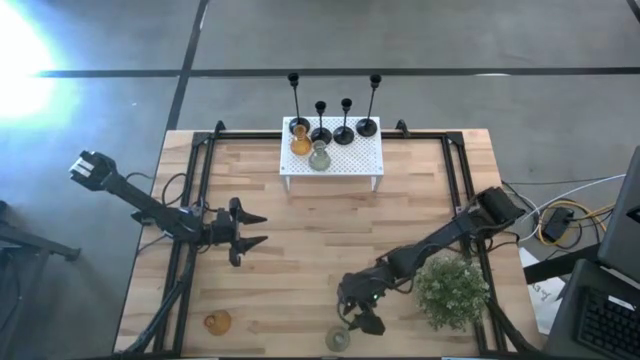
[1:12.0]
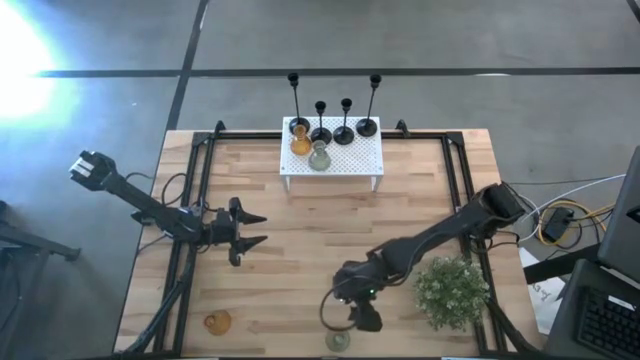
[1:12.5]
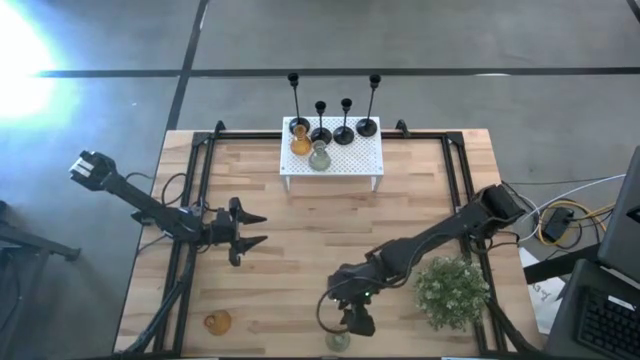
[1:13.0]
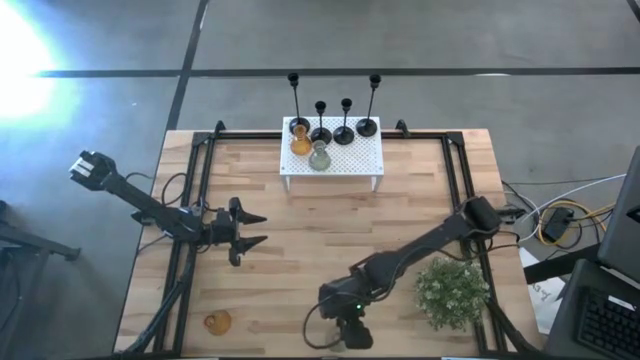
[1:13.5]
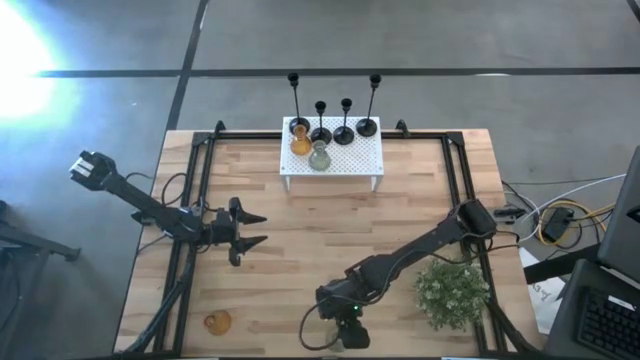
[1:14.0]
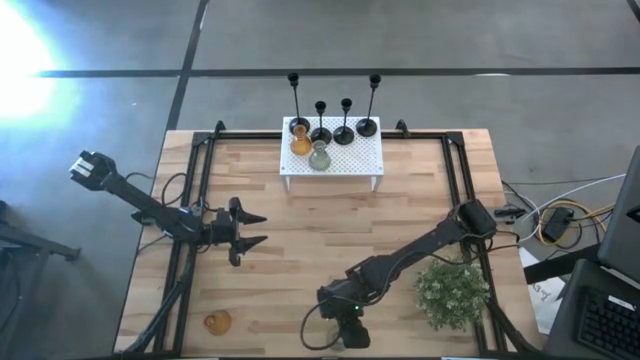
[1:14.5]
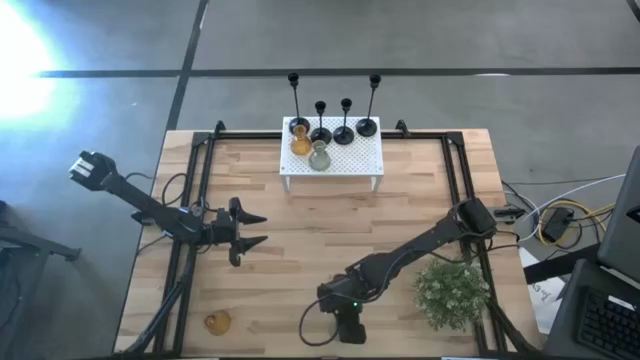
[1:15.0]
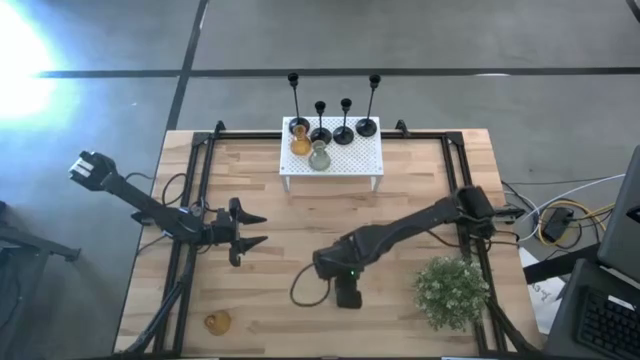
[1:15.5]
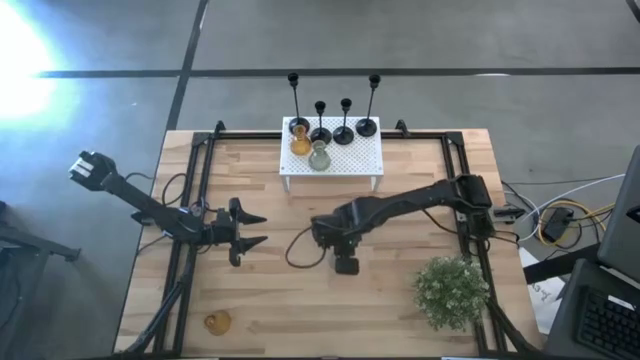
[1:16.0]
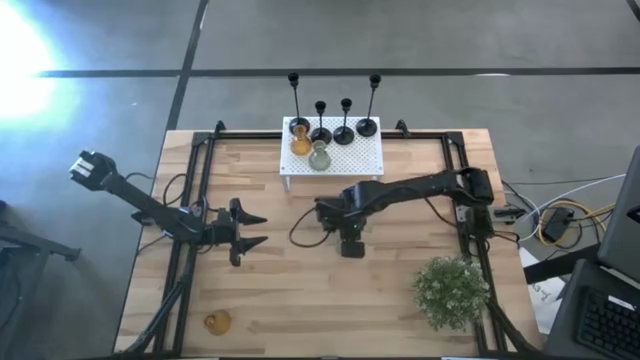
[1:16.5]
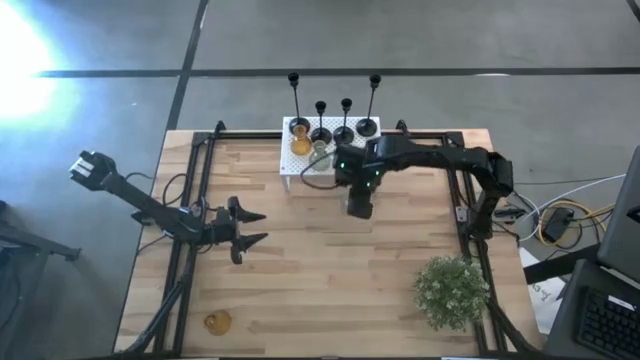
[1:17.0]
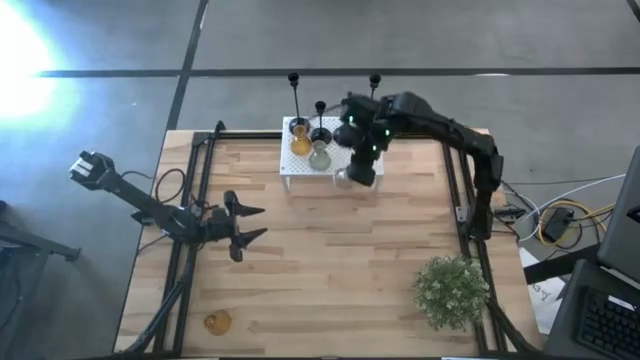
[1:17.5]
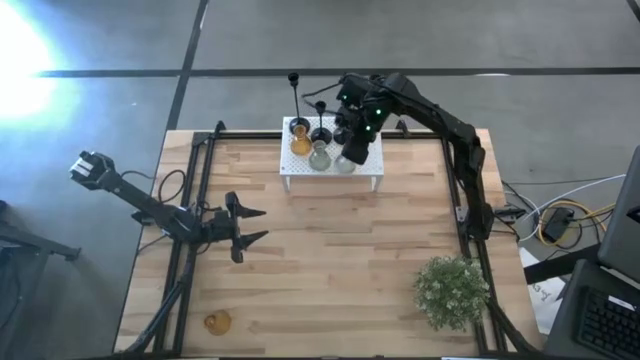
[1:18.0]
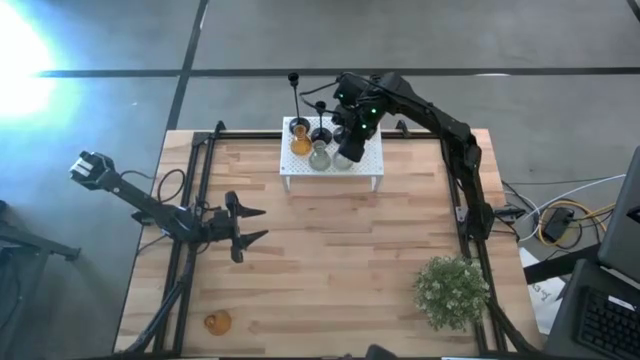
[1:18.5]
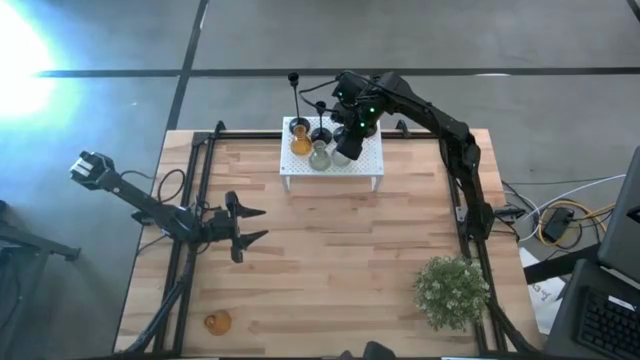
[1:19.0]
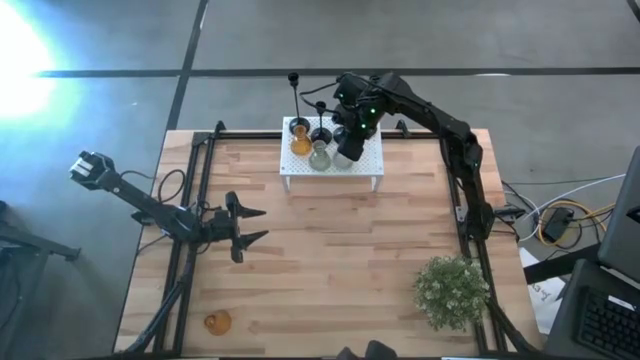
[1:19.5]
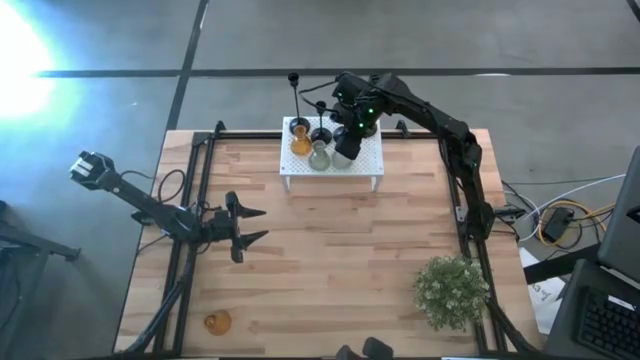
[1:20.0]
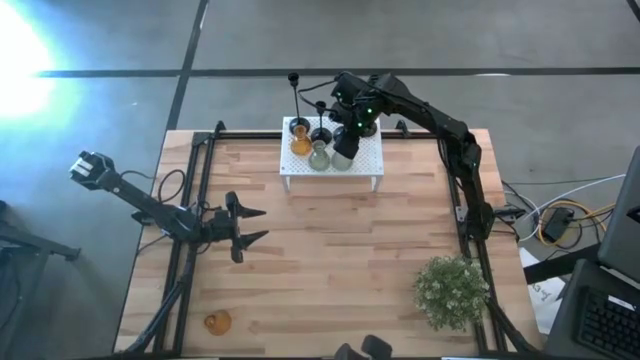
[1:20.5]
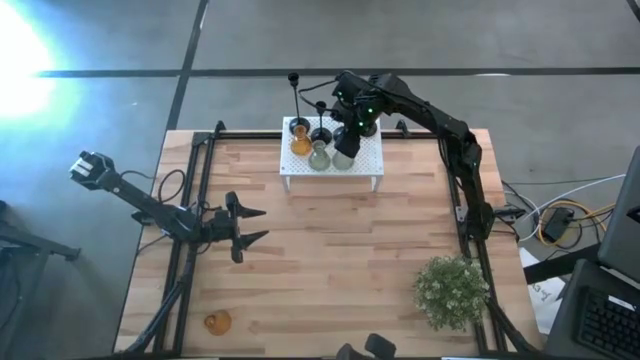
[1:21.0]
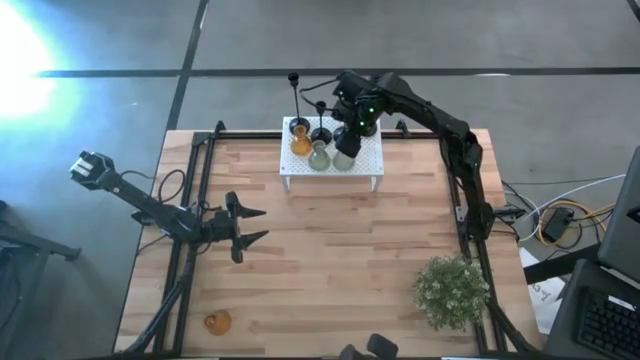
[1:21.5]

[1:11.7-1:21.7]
Task: Pick & Place candle stick holders
Put the green glass candle holder on the shelf

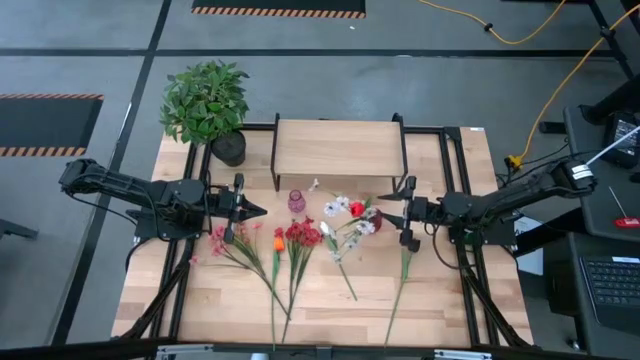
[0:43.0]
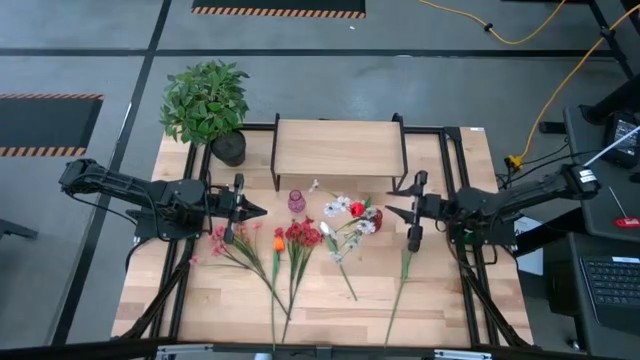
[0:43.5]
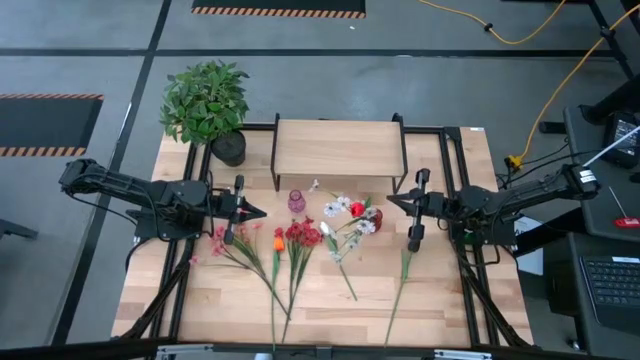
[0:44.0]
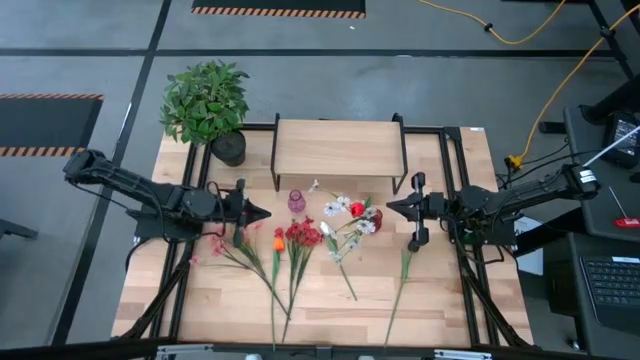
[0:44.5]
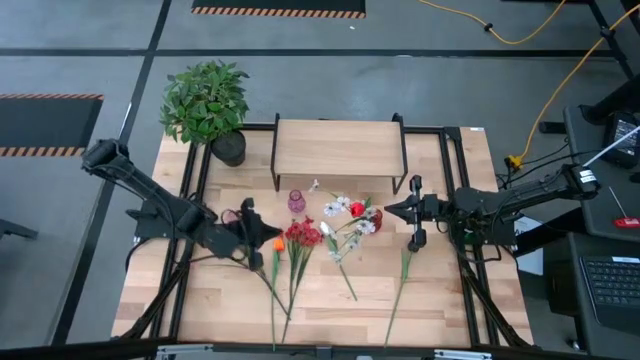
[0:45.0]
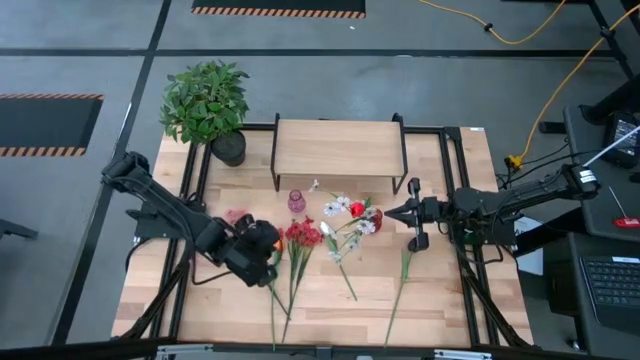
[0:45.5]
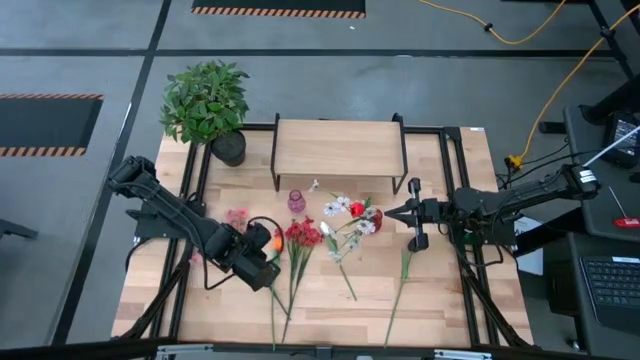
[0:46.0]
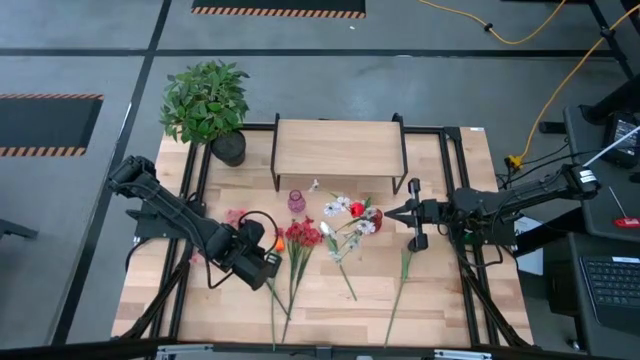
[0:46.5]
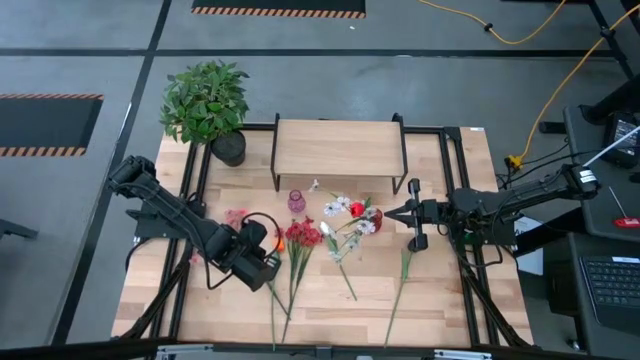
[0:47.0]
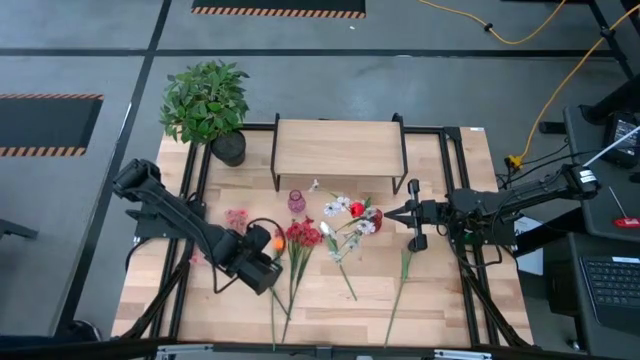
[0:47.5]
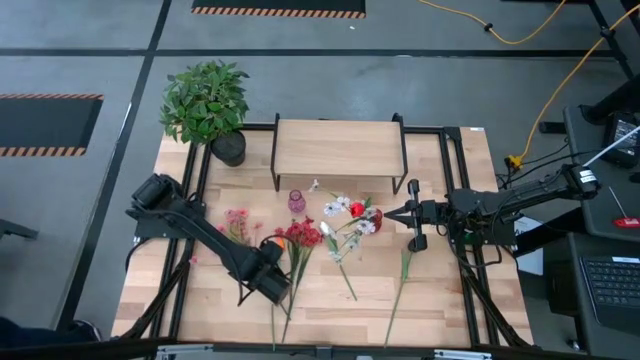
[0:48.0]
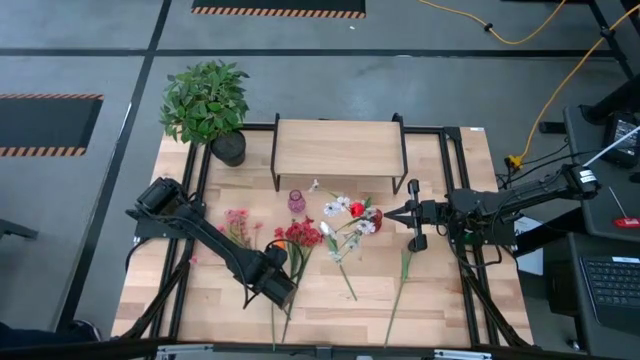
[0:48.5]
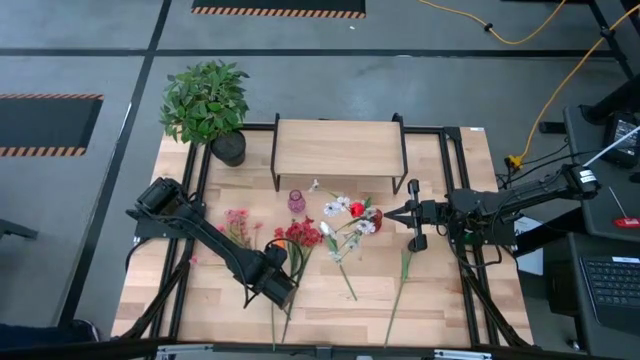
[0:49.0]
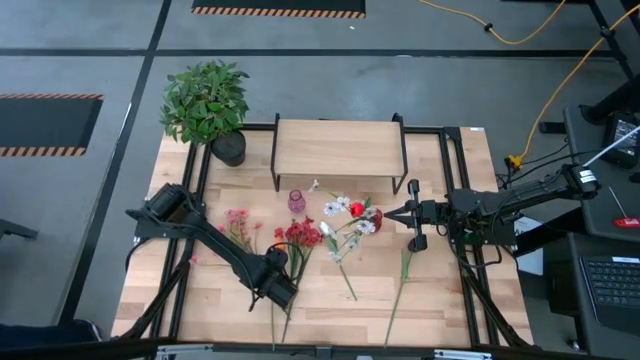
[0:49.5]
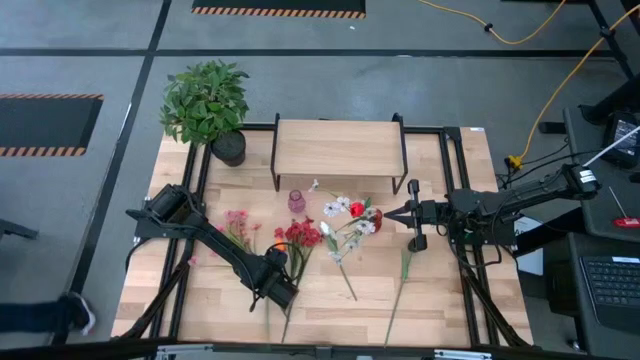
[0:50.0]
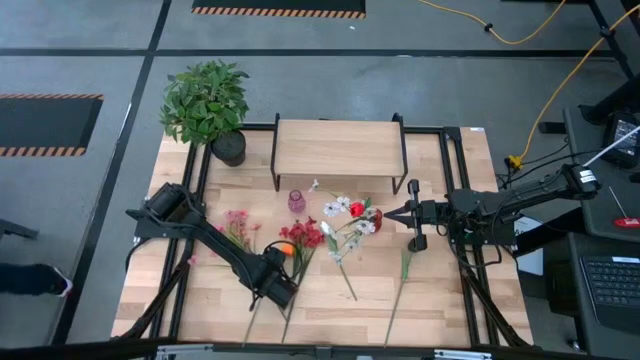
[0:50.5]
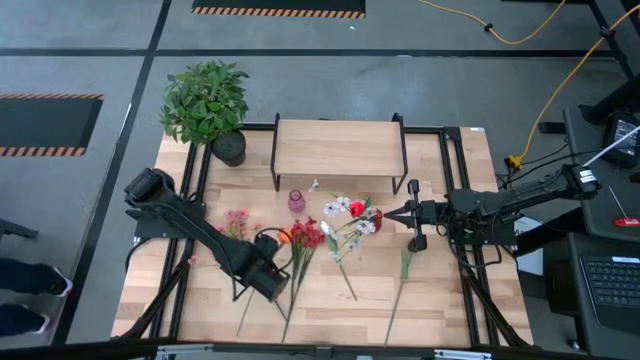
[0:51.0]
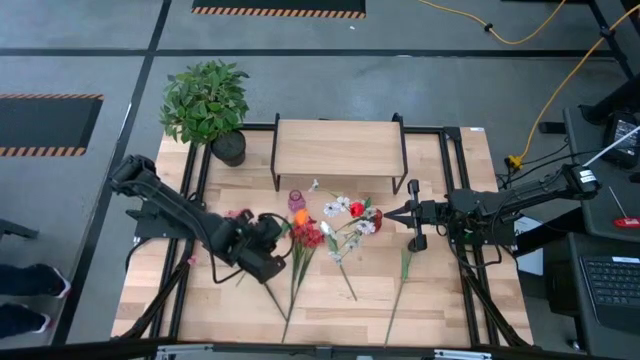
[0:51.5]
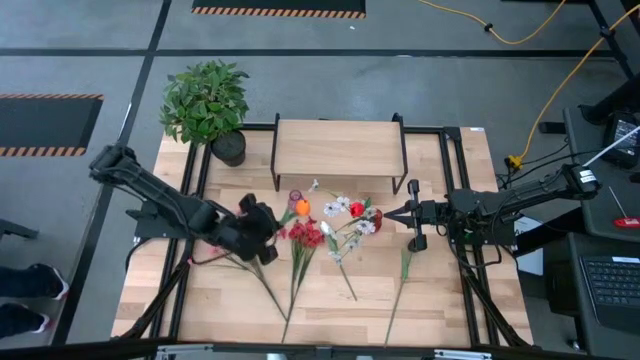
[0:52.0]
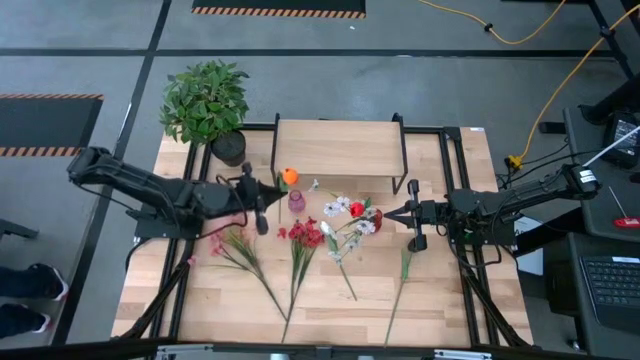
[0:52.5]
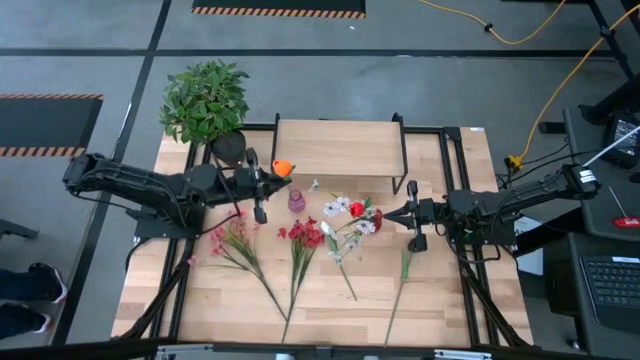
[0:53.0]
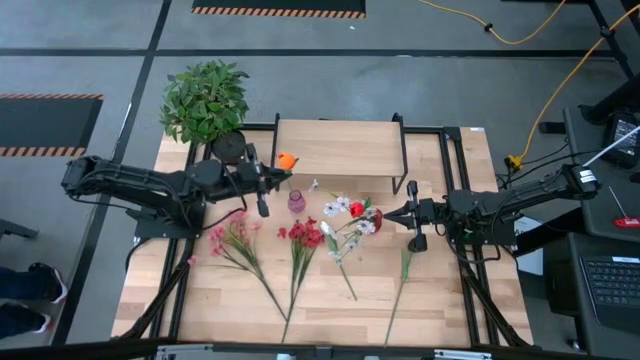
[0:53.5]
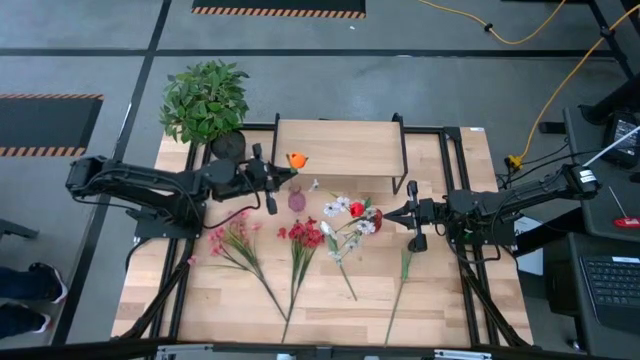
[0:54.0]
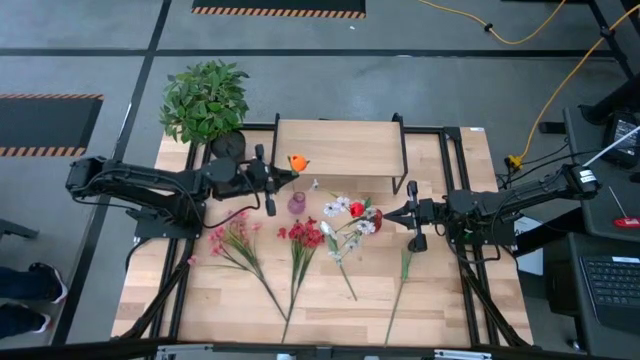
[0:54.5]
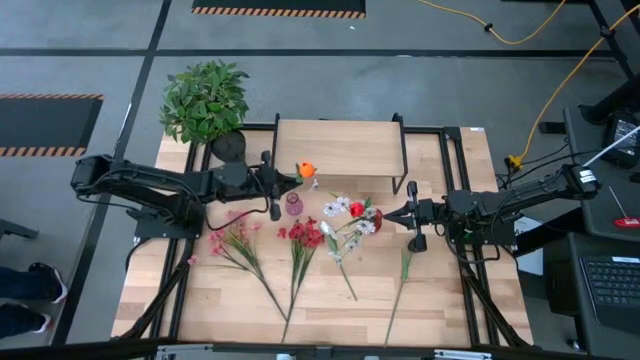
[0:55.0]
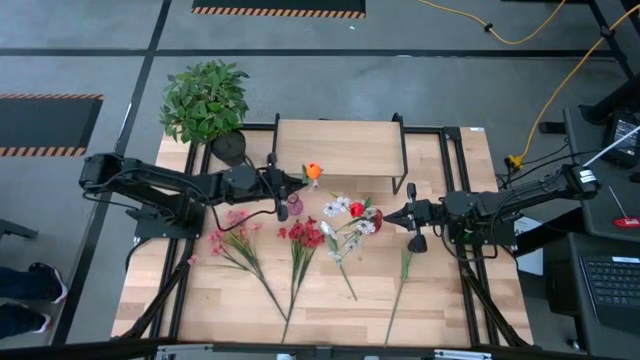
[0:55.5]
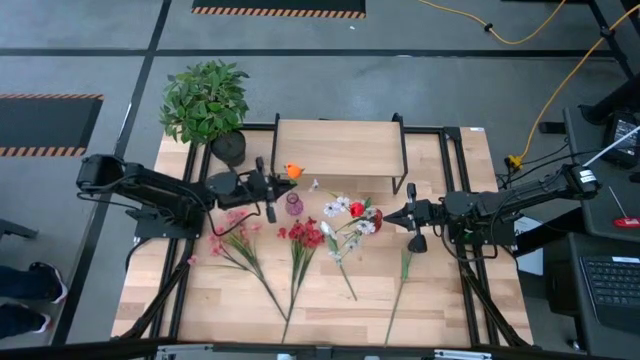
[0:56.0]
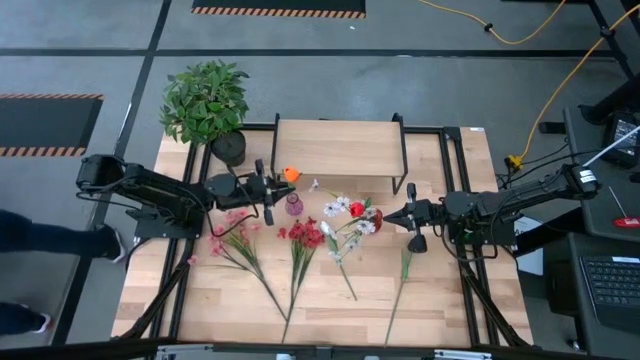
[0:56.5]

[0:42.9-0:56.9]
Task: Pick and place flowers into a vace then onto a shelf
Put the orange tulip into the purple vase
